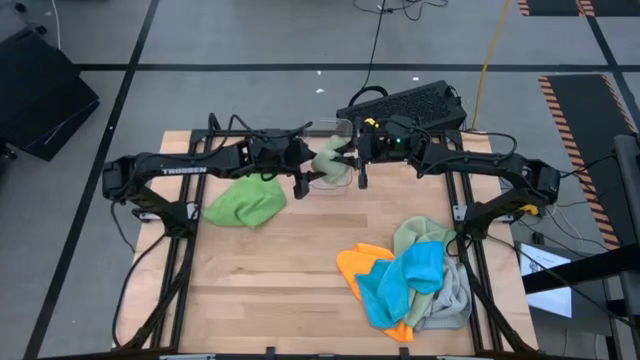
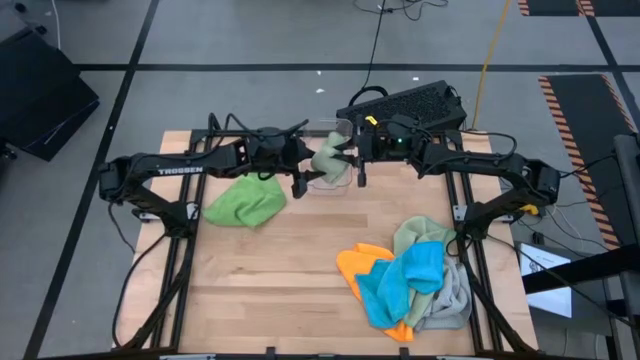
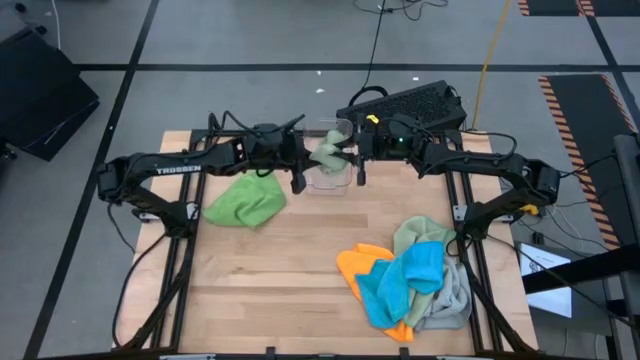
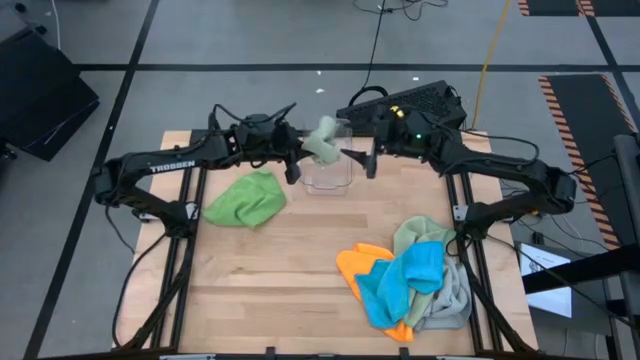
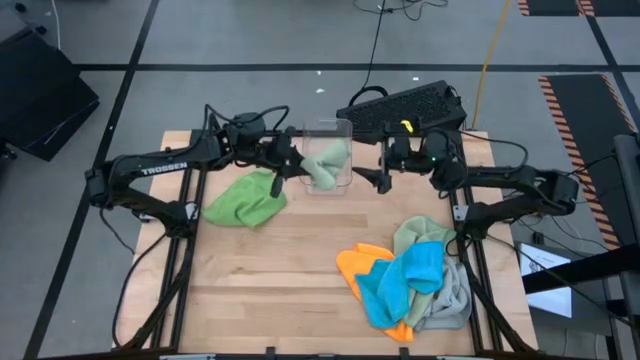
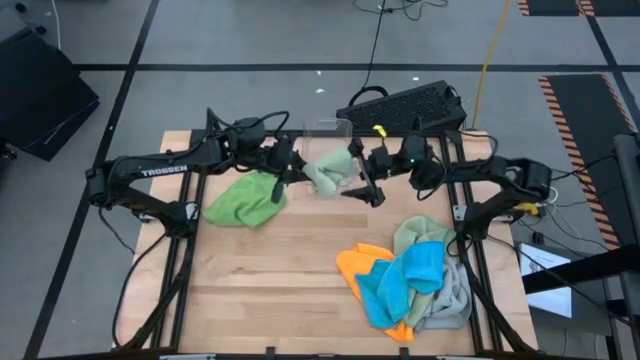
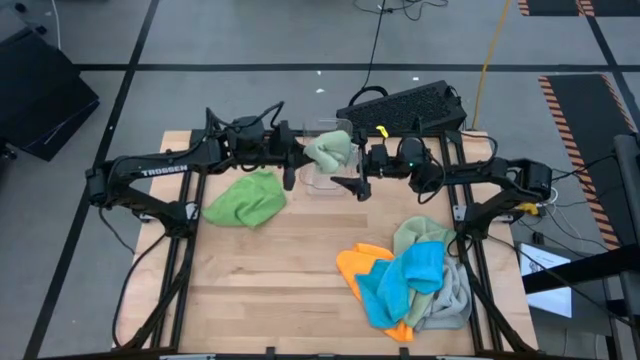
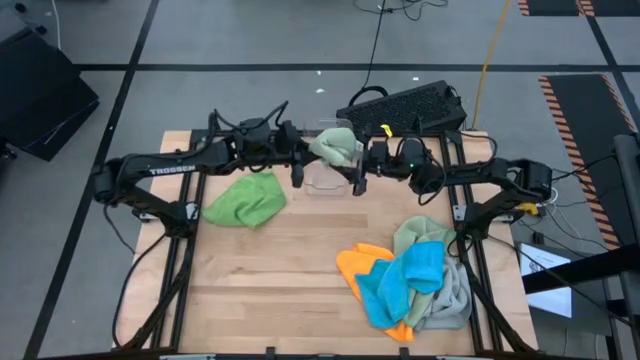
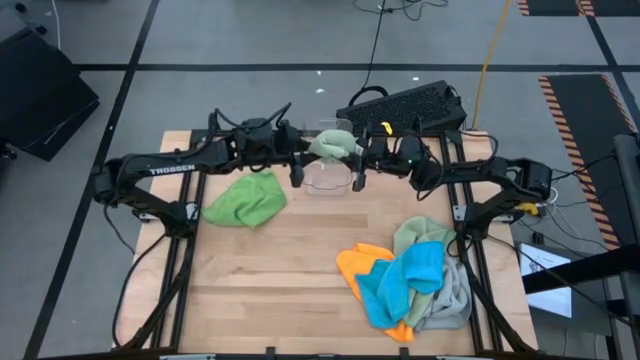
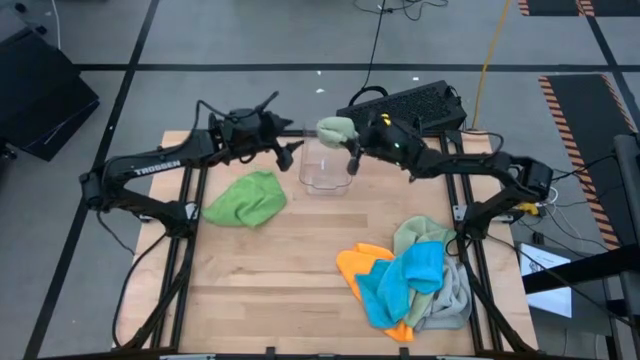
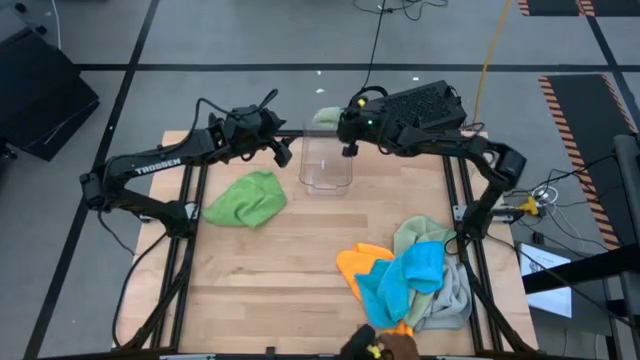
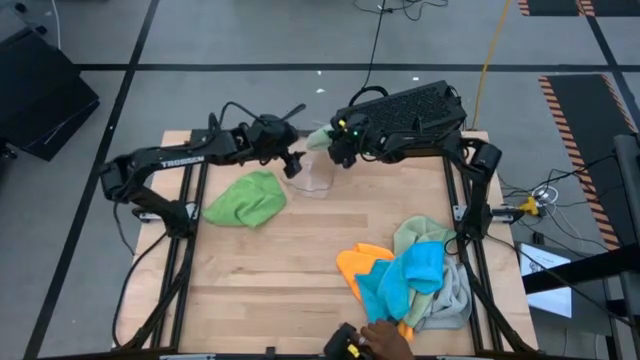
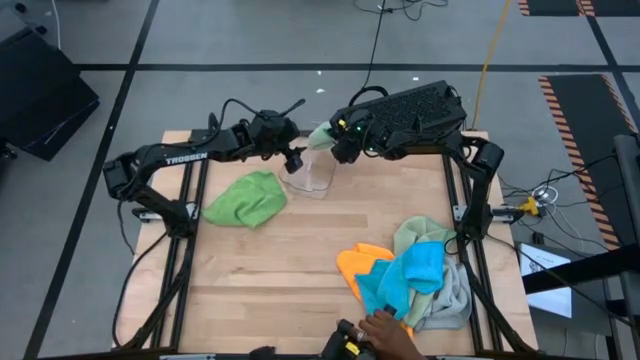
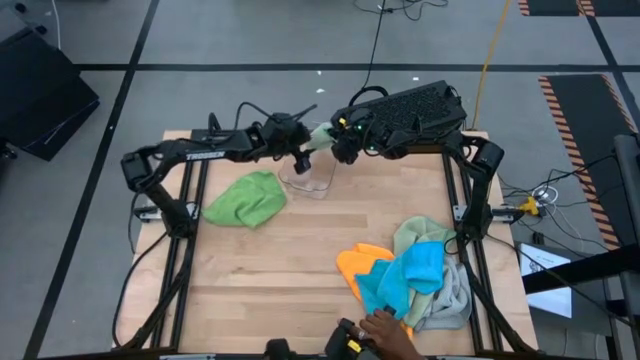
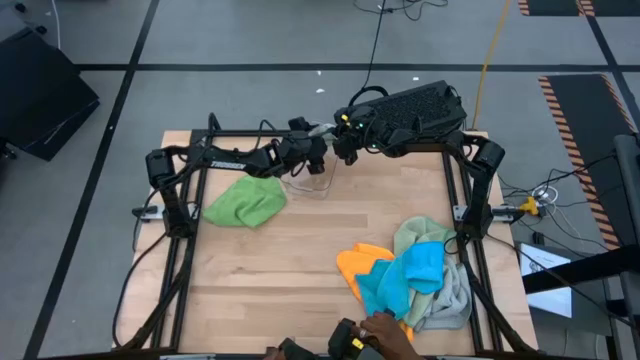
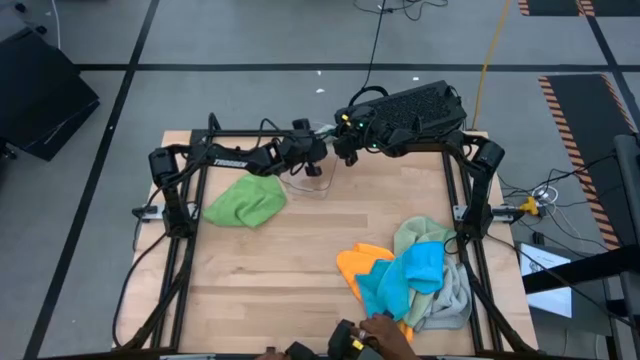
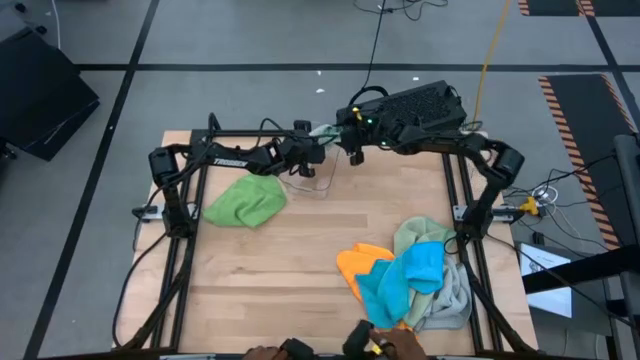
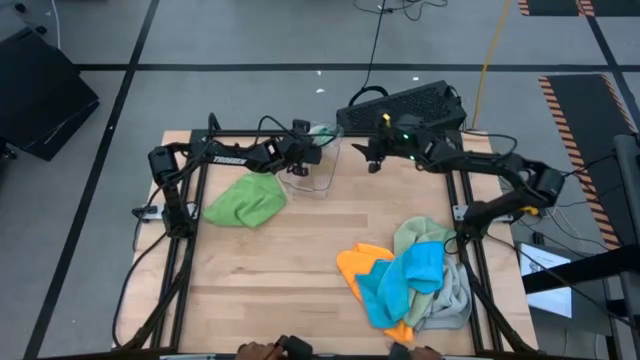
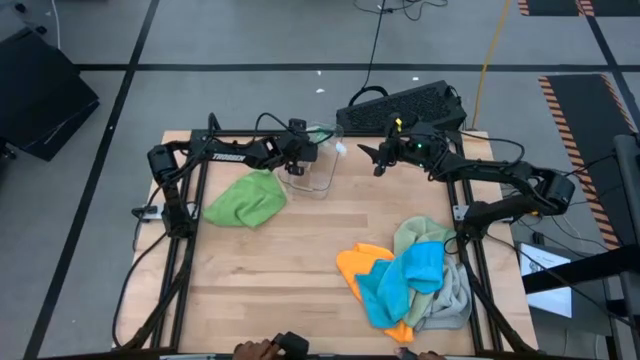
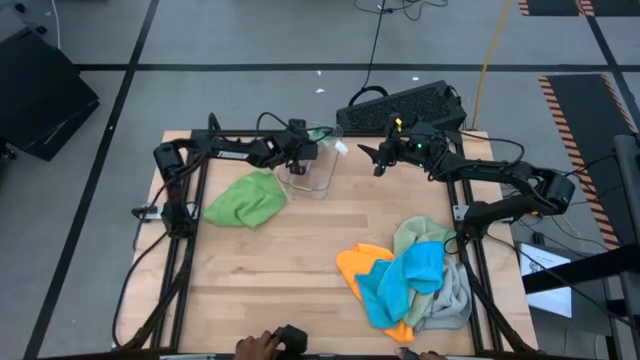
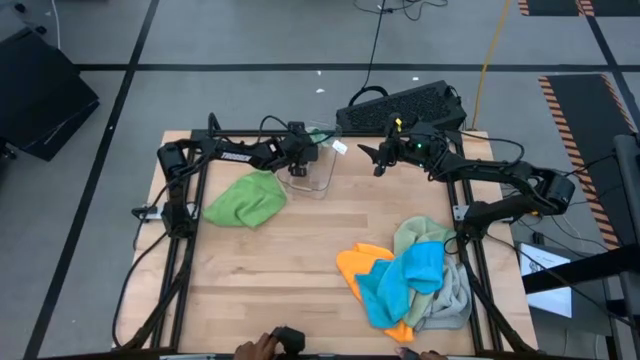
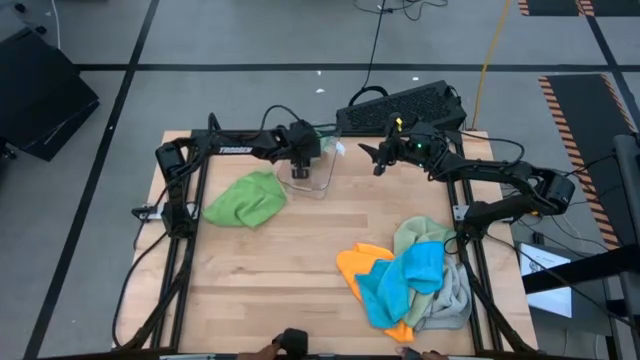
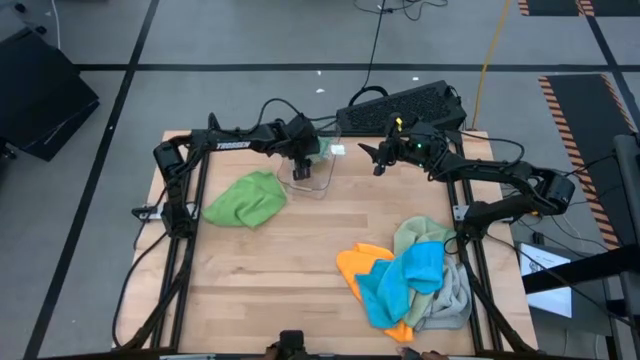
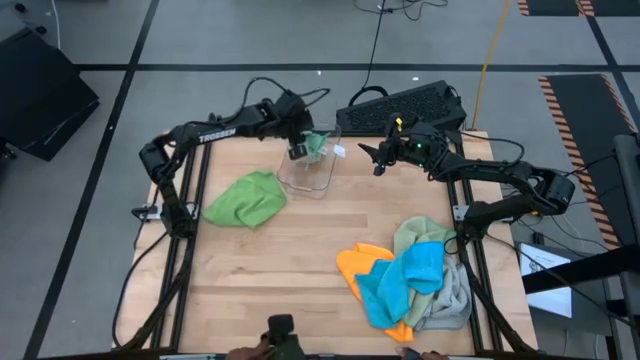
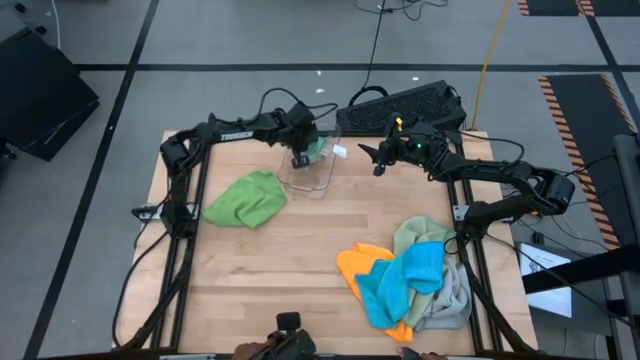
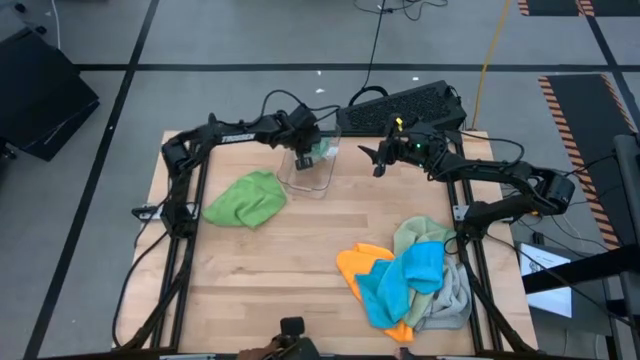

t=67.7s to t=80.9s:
Task: Fold microfiber towels
Put the folded light green towel into the transparent bin
